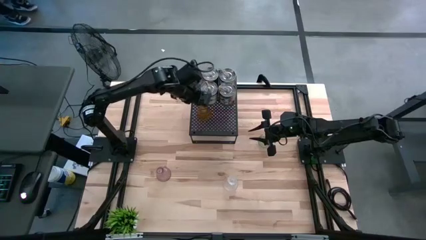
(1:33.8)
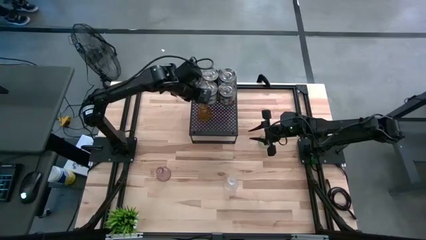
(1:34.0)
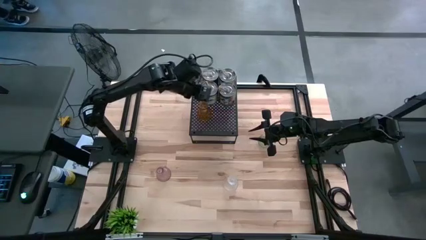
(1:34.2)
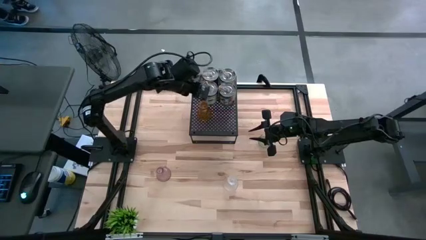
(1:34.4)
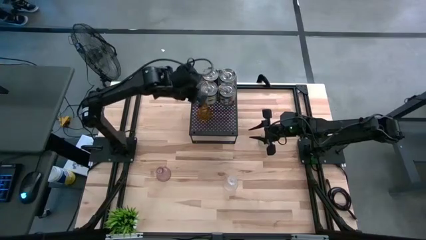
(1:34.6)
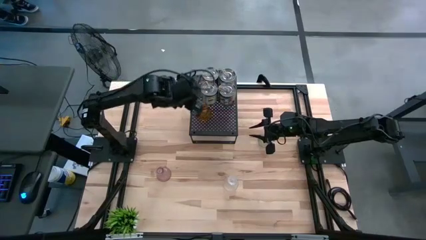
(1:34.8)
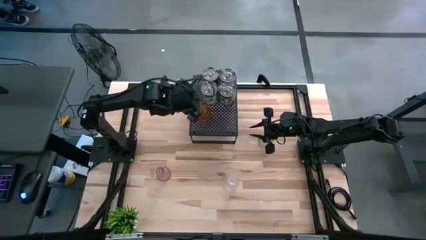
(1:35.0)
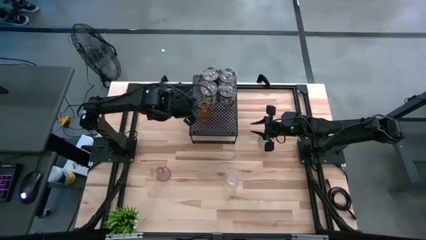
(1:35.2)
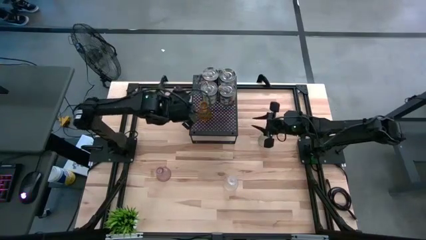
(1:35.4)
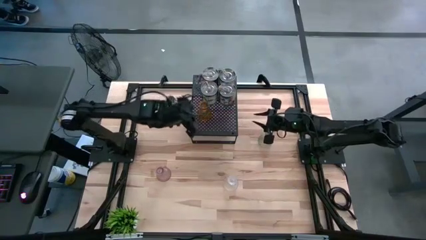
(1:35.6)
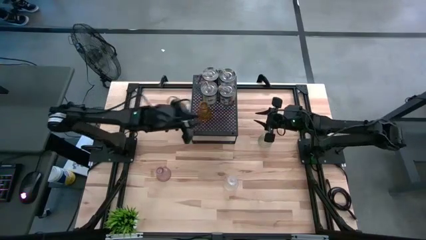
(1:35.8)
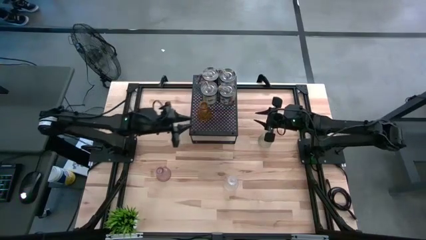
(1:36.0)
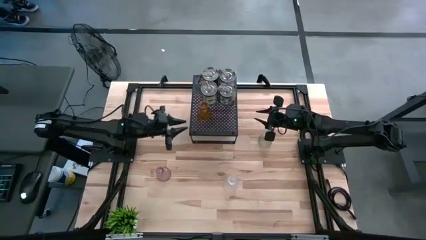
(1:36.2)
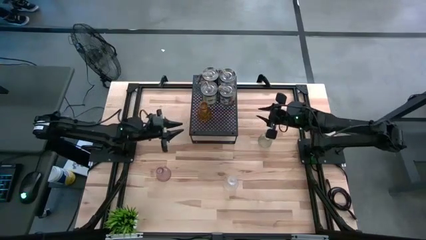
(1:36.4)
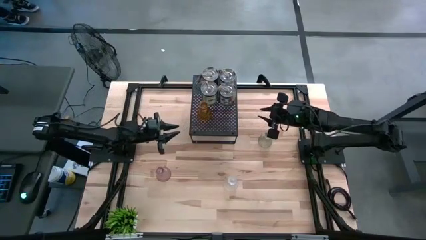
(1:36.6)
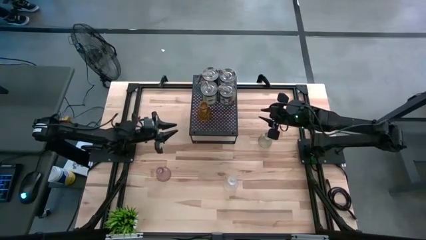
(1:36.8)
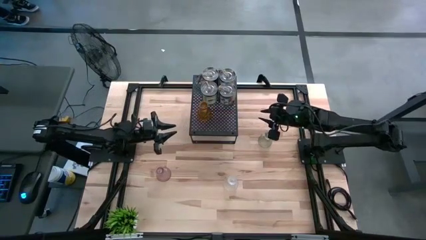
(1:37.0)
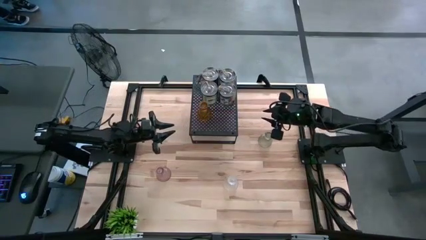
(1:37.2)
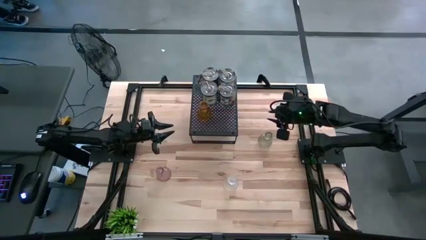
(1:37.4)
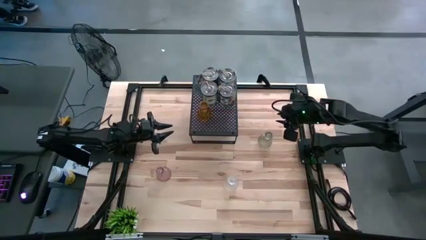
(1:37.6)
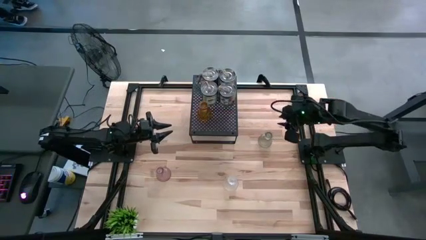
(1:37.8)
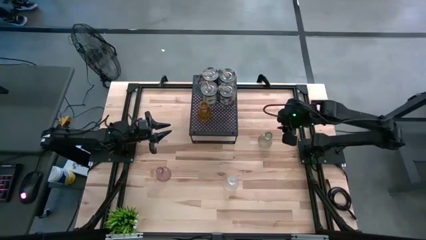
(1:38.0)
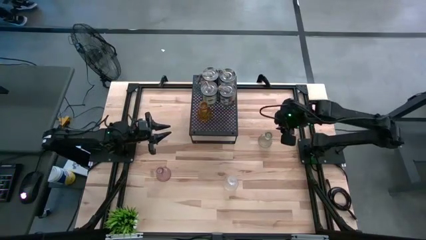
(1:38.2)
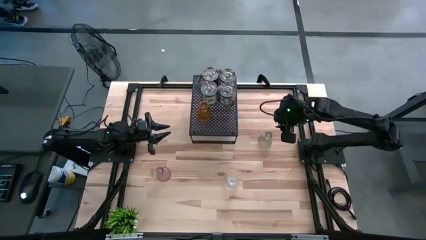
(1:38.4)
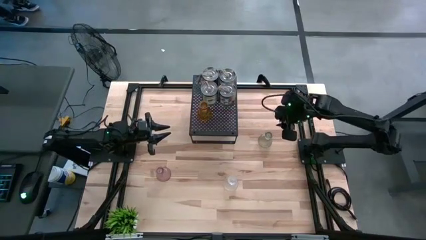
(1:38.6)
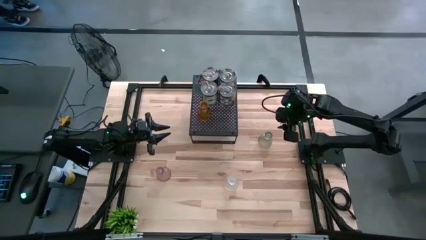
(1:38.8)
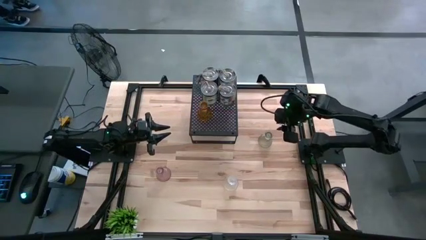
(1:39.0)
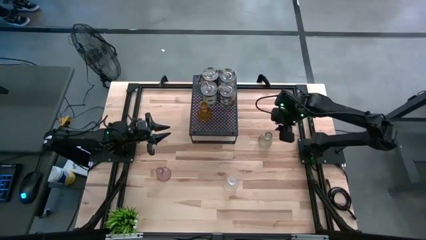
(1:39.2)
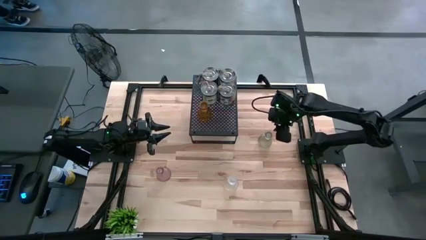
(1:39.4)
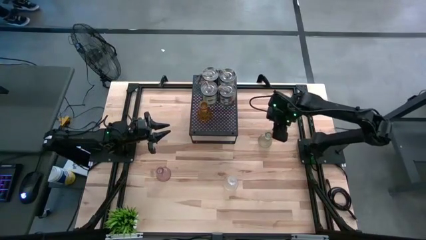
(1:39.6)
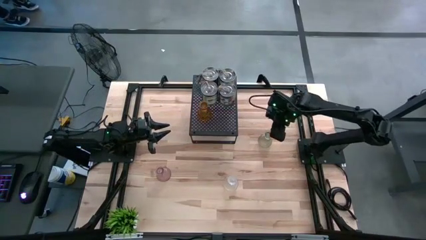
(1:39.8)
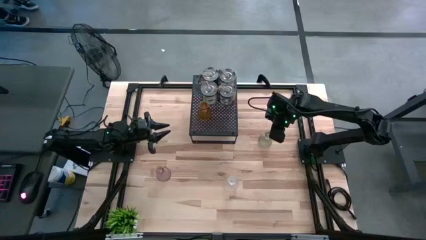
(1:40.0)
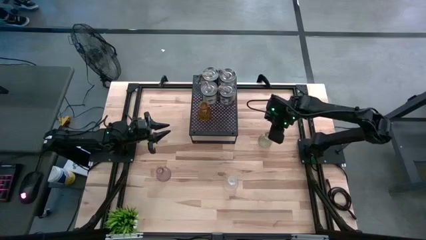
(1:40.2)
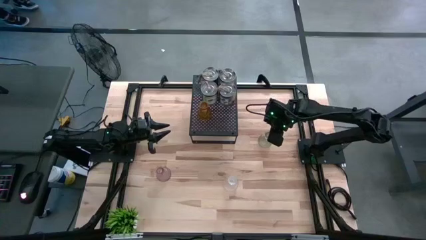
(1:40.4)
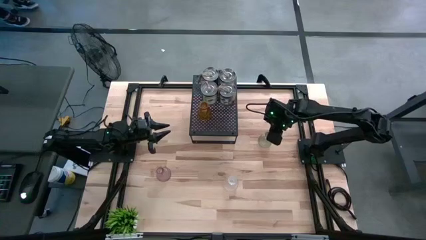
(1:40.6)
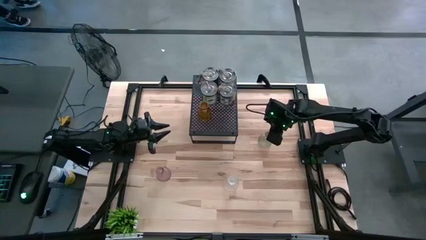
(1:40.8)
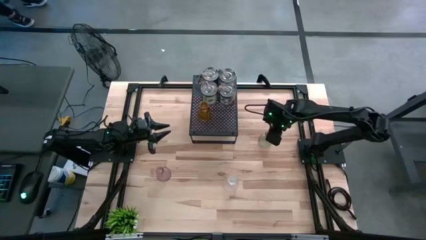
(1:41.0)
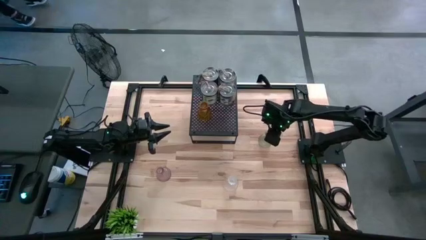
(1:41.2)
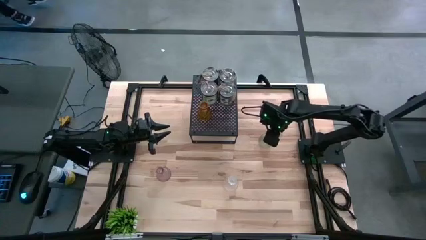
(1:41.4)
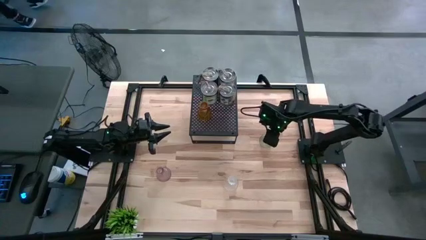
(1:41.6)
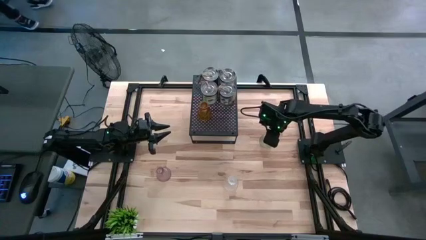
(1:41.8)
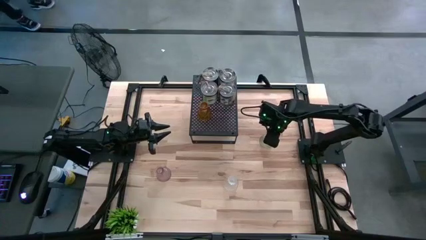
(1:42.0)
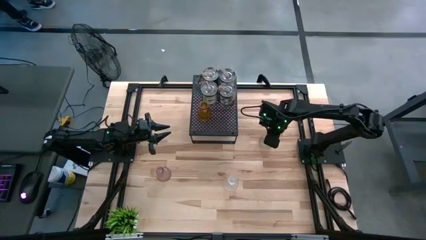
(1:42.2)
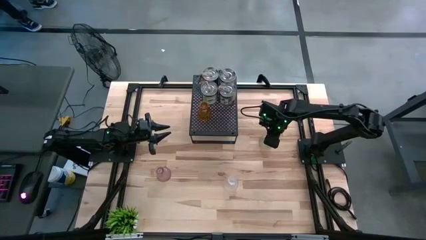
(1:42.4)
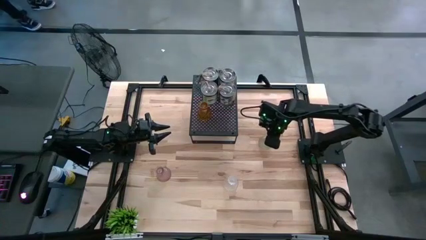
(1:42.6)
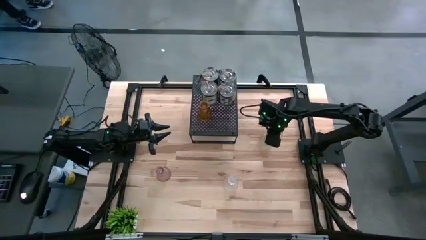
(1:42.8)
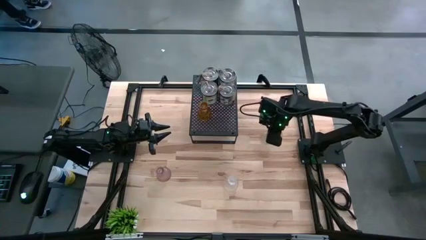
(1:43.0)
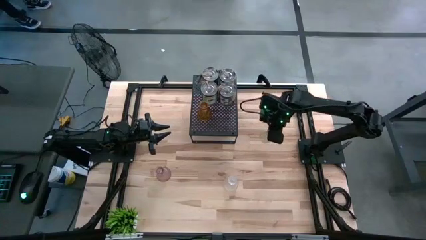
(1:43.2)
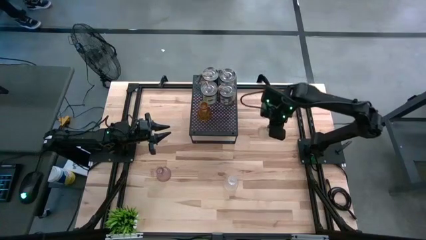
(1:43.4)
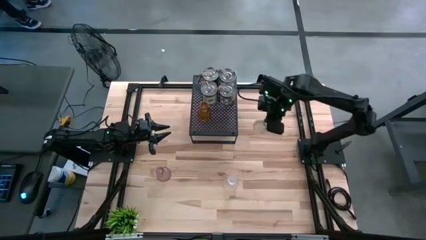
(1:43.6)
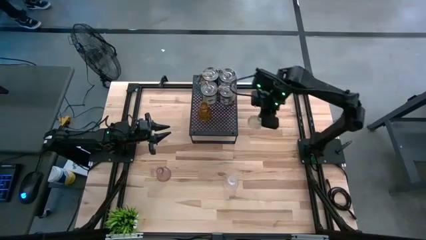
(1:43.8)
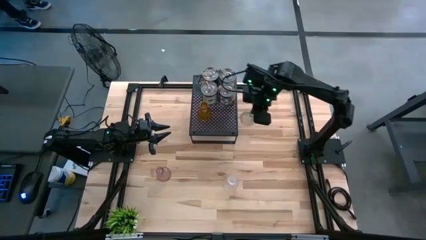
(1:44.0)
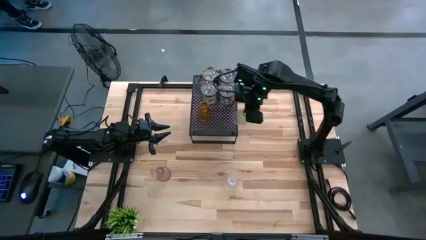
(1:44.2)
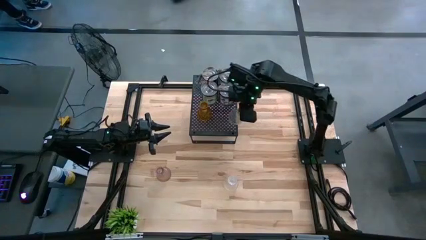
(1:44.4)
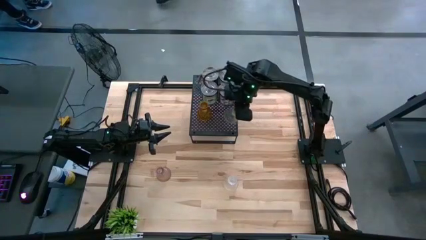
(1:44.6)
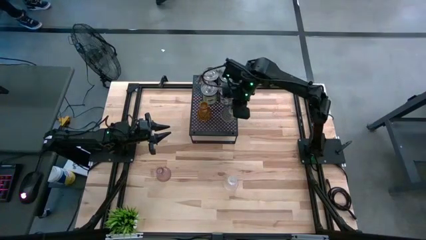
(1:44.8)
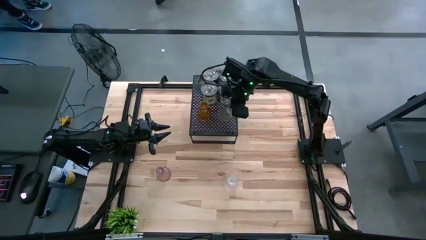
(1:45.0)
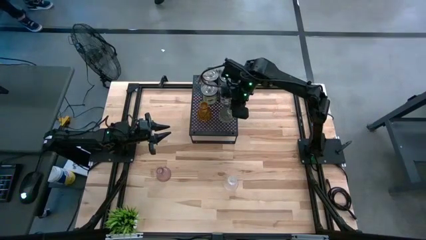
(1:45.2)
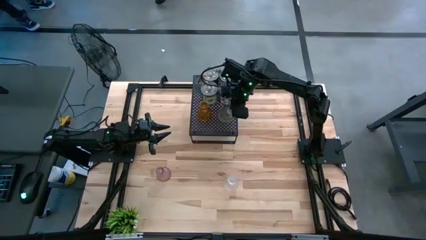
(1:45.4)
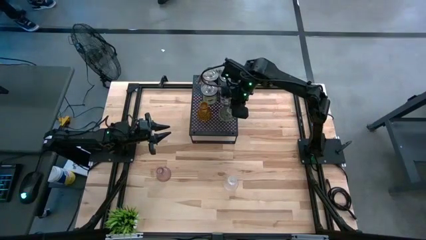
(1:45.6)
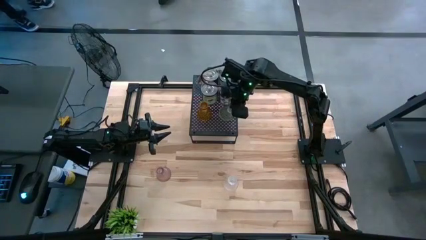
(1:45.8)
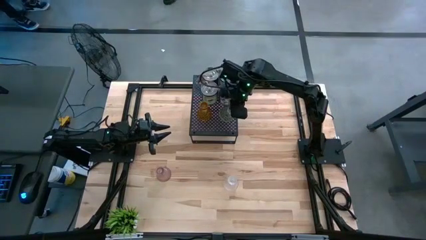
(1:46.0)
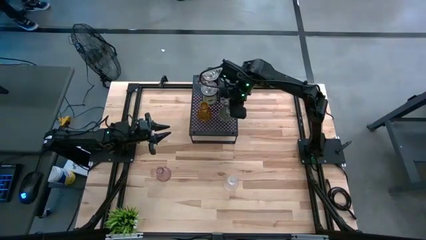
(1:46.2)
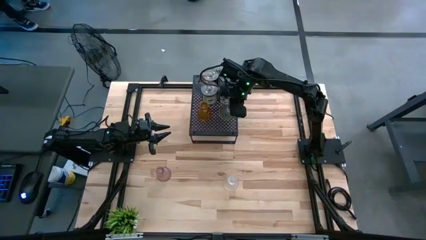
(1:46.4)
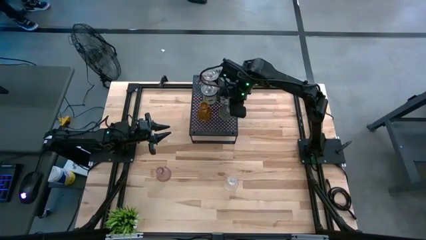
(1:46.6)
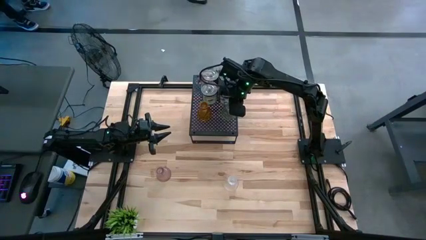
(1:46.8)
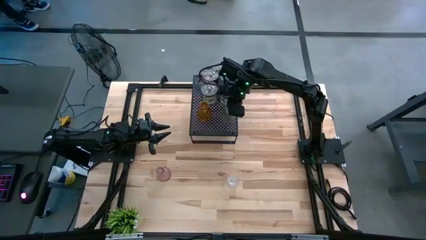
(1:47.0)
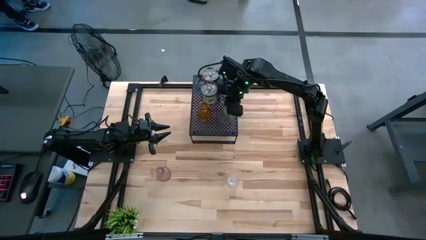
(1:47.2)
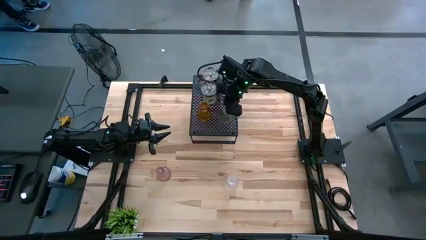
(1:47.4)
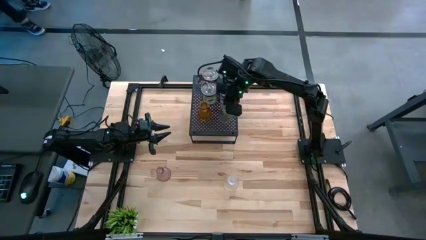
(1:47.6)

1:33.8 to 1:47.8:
Task: Pick & Place candle stick holders
Put the green candle holder on the black shelf

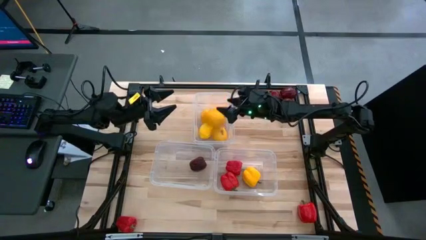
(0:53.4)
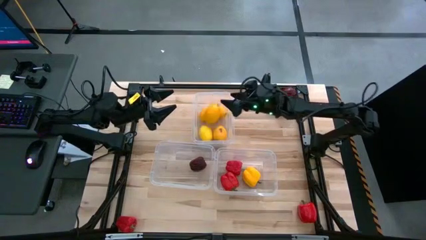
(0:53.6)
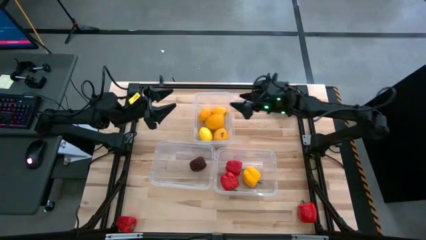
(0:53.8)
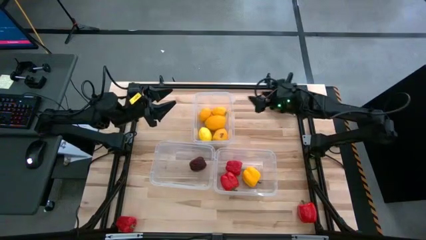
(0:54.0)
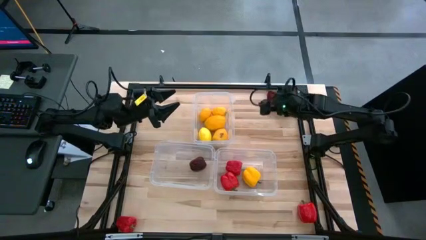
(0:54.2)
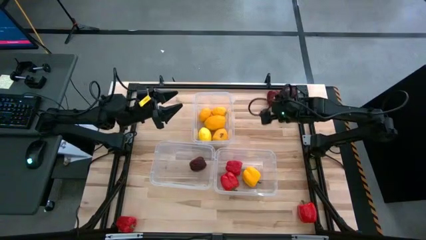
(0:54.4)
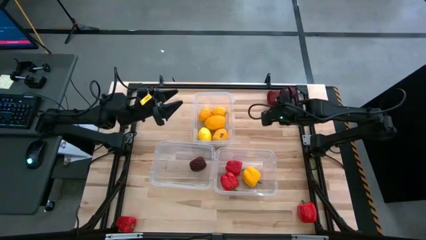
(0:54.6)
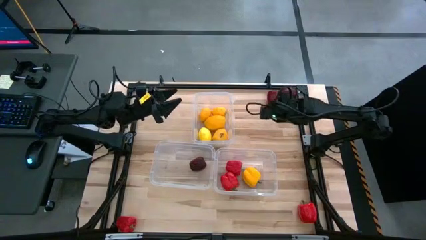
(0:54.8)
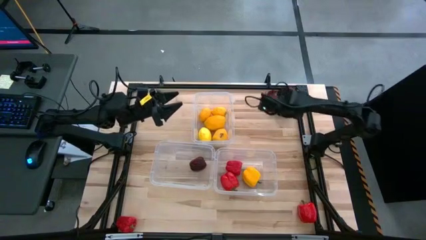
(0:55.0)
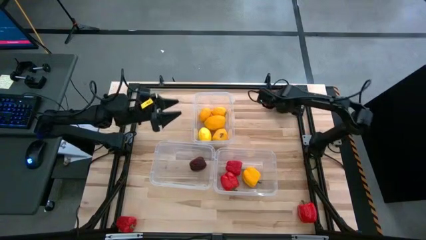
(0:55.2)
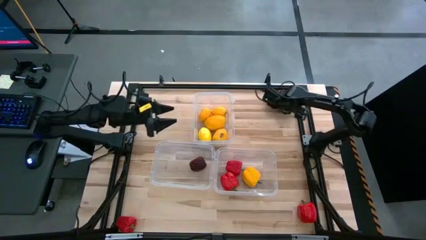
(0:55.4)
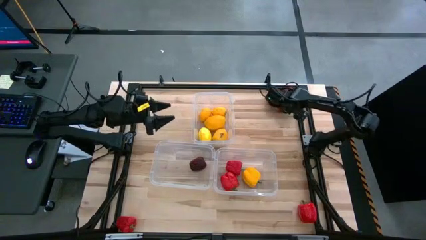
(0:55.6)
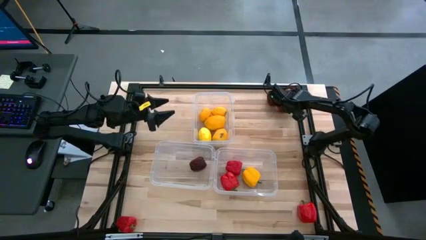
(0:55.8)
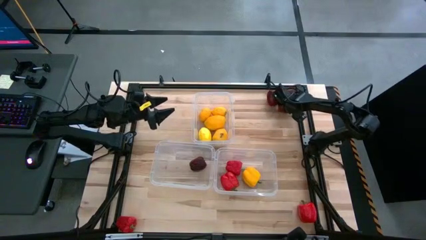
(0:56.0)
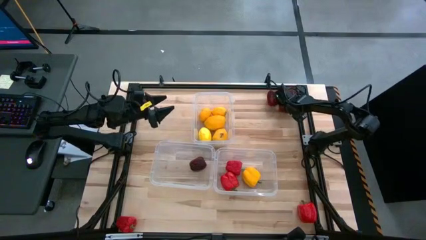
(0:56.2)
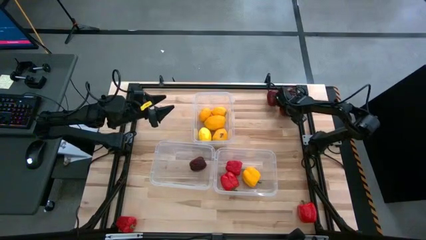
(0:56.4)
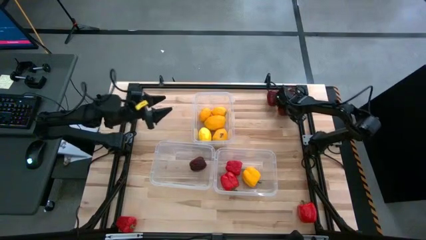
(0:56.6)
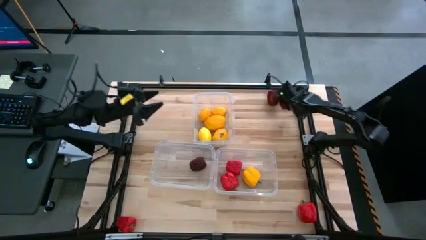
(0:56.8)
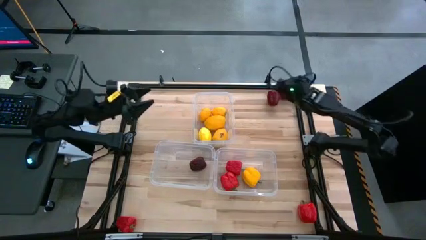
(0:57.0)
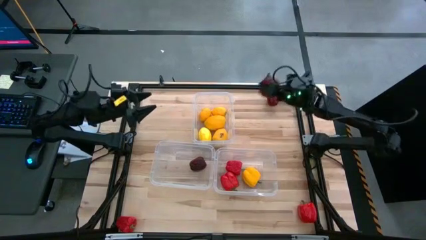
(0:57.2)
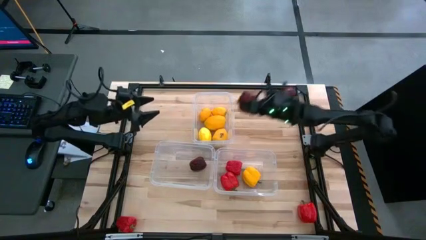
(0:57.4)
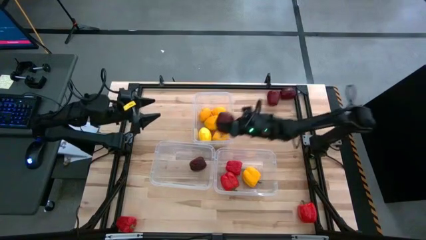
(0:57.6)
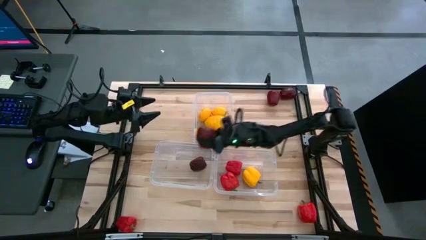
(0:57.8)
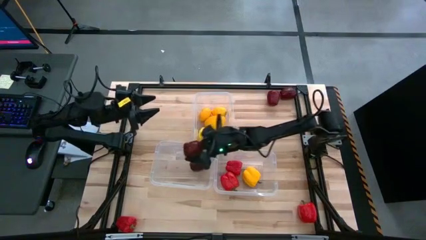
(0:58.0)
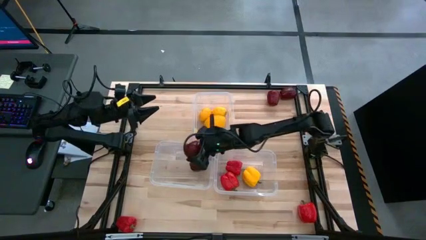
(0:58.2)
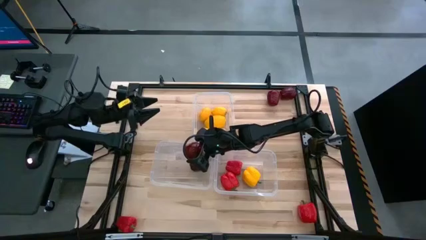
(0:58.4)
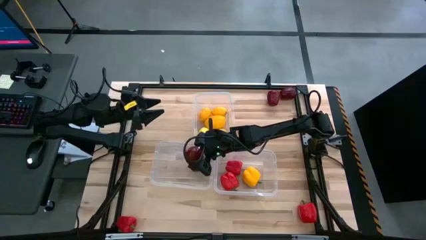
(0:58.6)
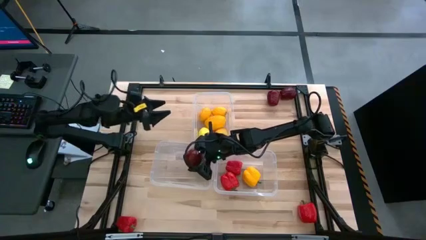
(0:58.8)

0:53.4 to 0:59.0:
Task: Sort produce into baskets
Put the red apple into the bottom left transparent bin
